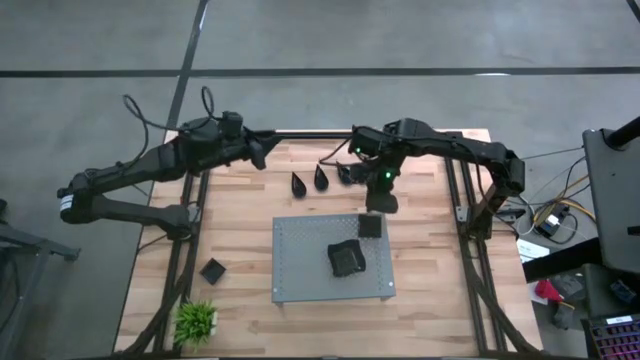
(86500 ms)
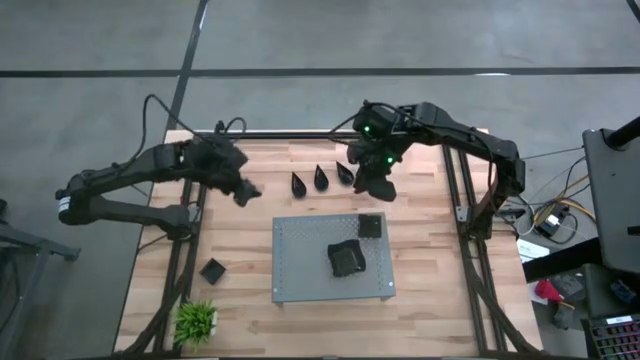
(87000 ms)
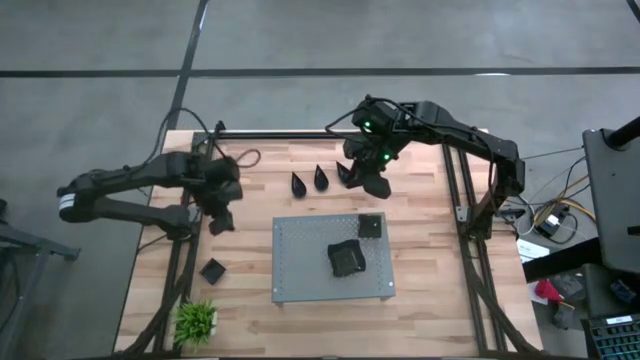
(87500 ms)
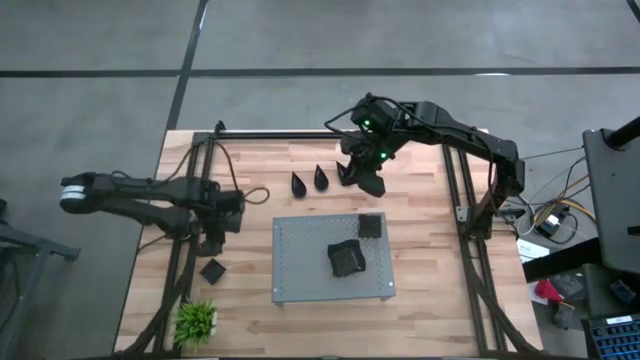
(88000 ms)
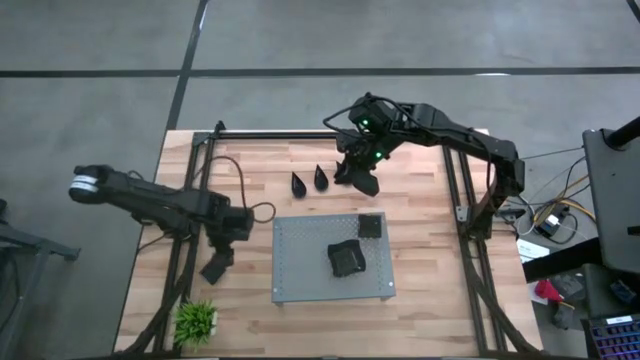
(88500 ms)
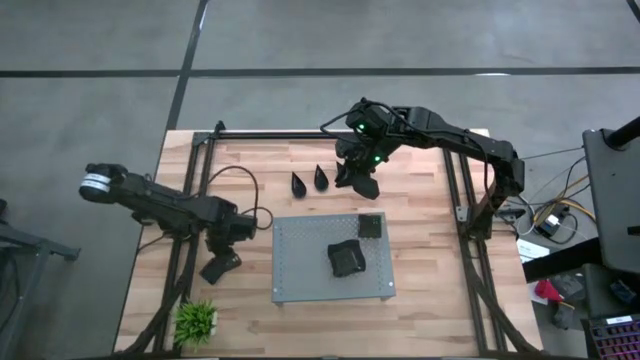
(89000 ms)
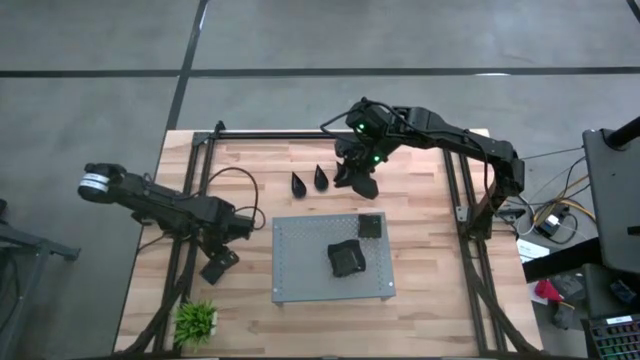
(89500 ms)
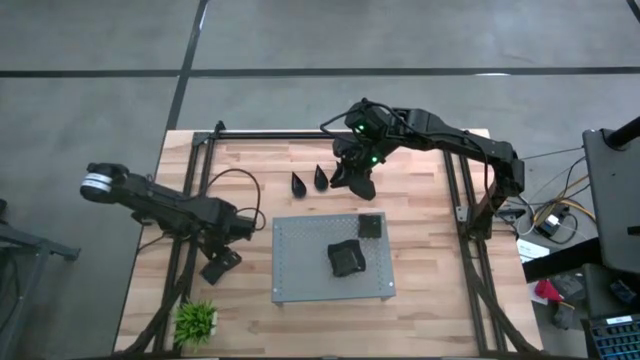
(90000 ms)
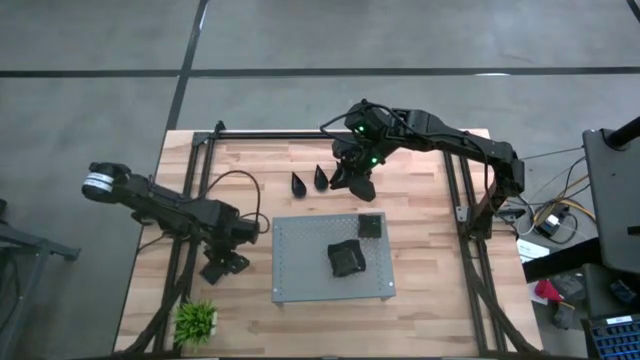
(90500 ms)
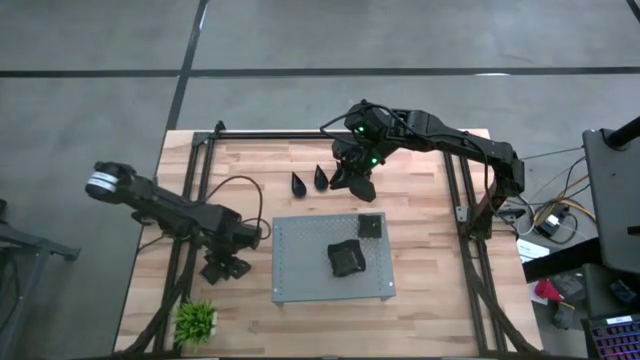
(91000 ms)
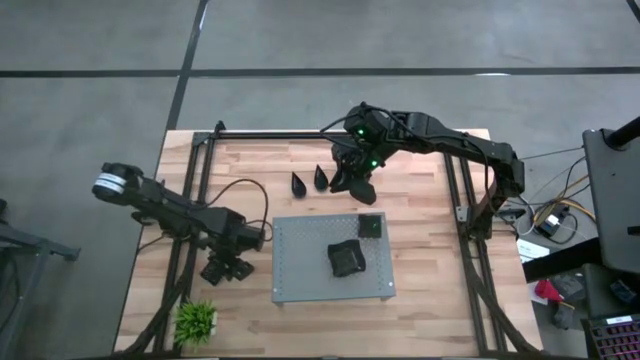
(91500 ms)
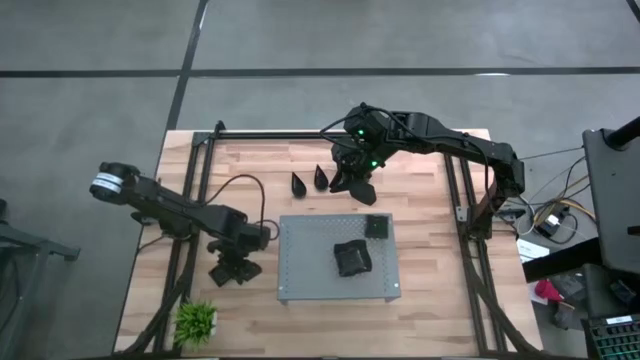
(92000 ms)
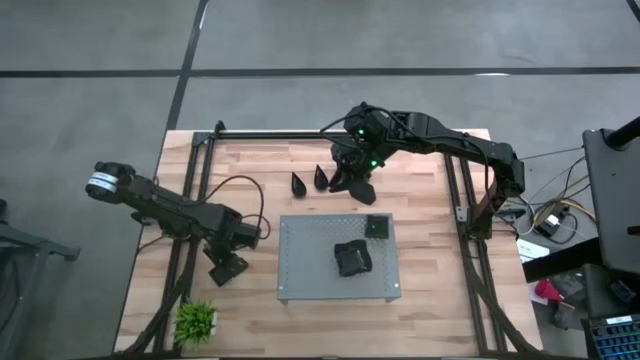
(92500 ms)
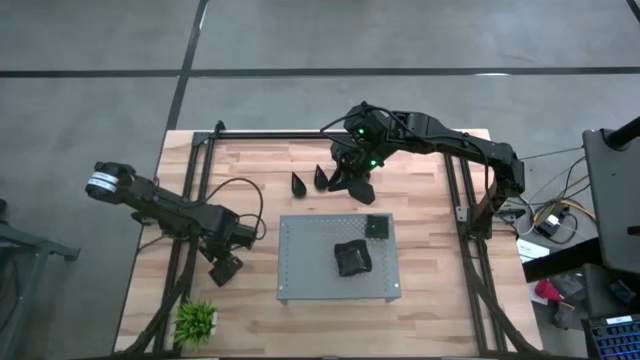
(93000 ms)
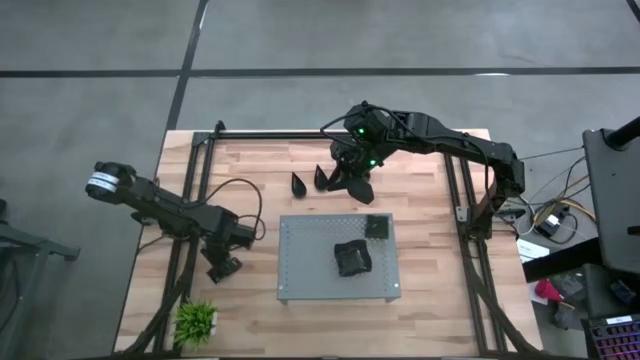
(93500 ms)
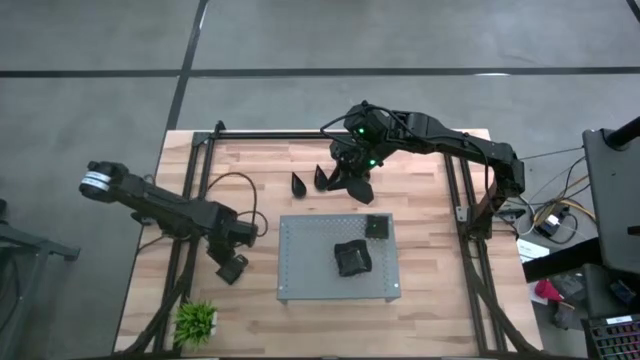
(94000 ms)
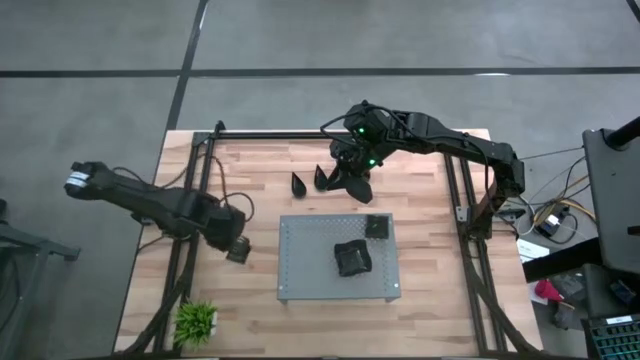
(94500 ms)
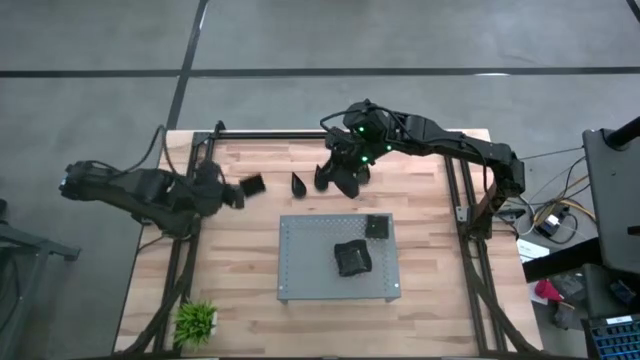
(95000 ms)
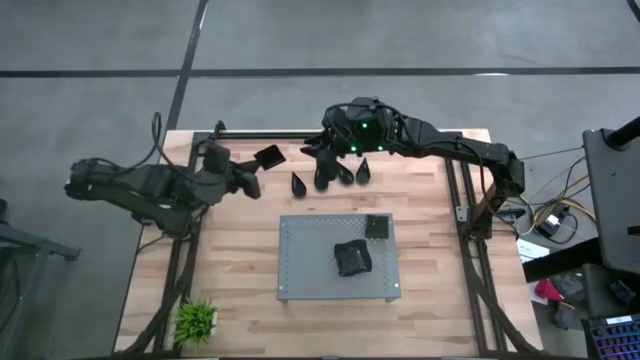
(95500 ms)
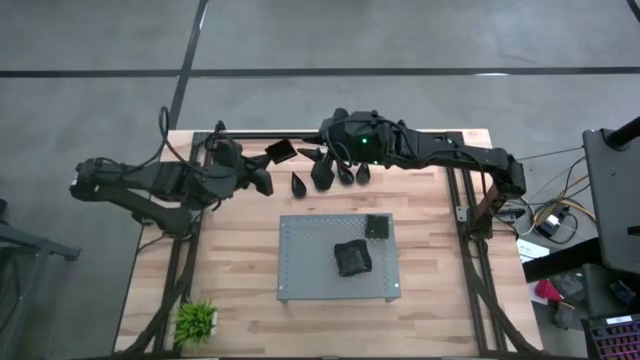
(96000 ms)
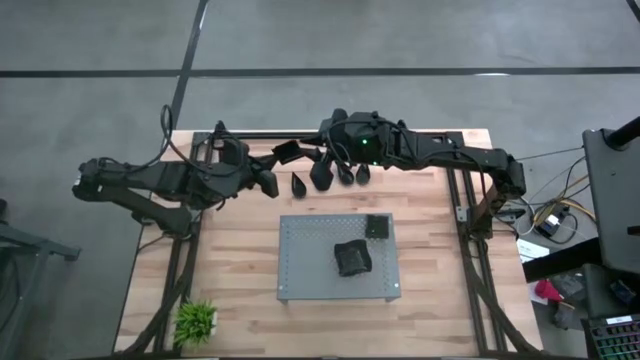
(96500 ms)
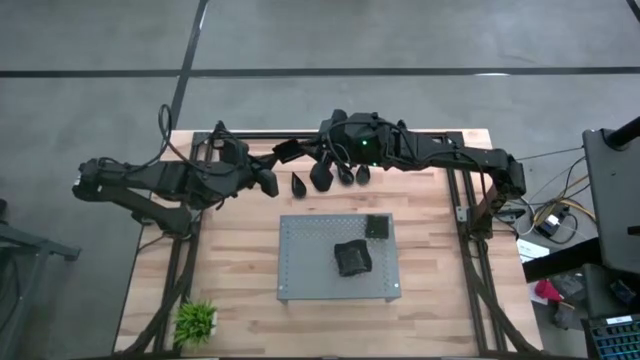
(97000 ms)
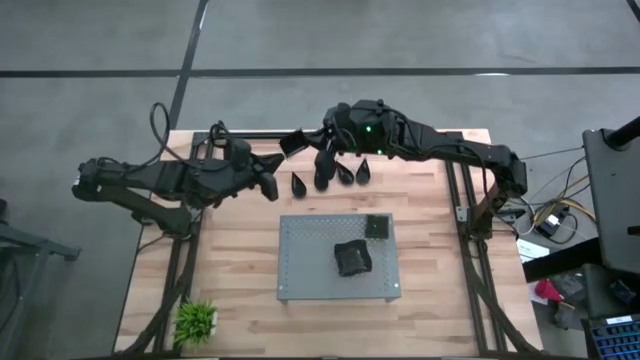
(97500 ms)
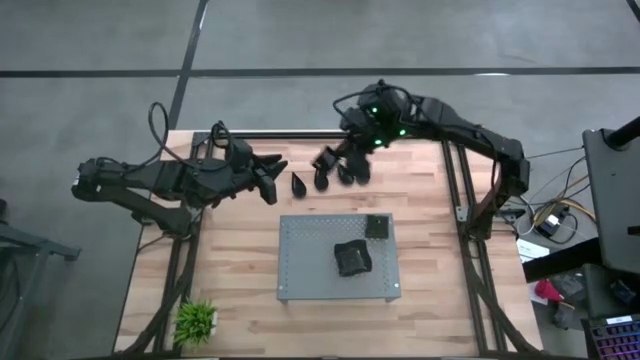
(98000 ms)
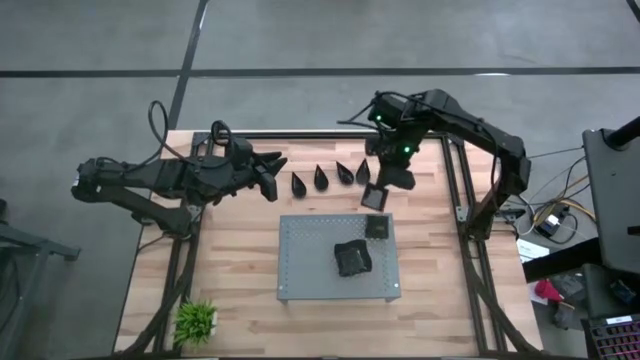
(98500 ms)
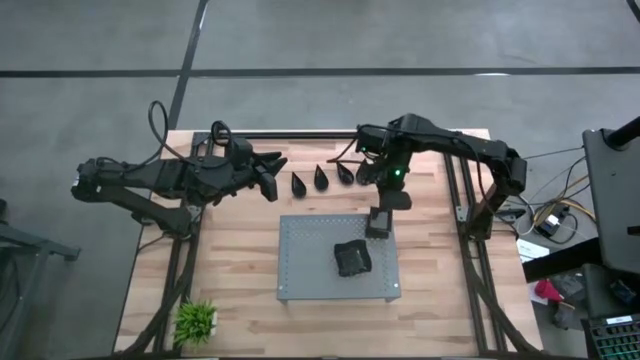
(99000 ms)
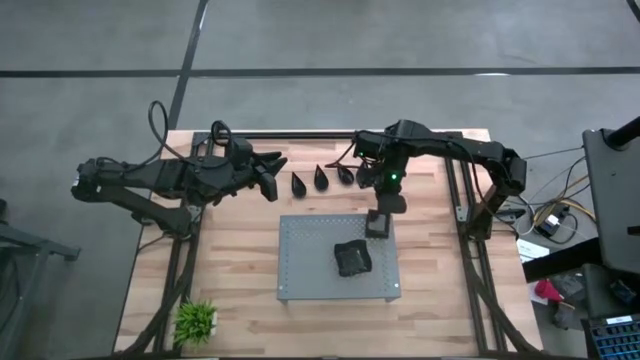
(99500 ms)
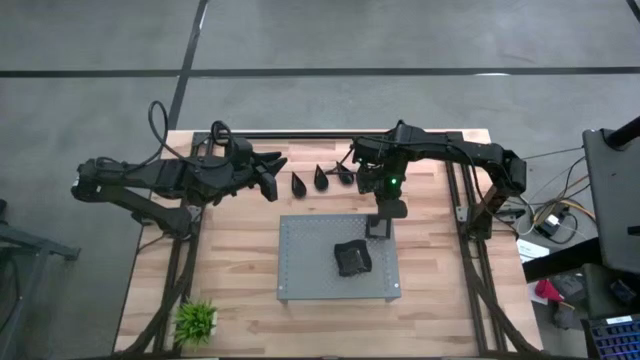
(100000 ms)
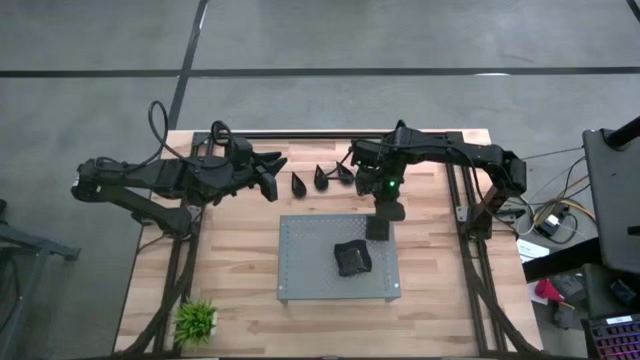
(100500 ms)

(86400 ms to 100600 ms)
Task: Pick & Place Mini shaped plates
Stack the square plate on top of the other square plates on the shelf
